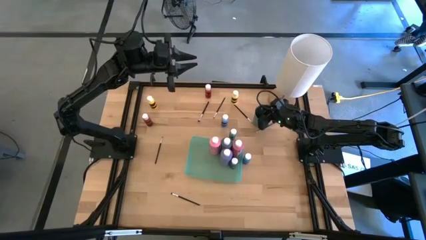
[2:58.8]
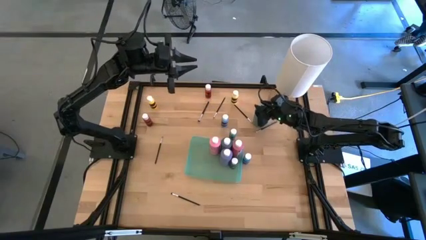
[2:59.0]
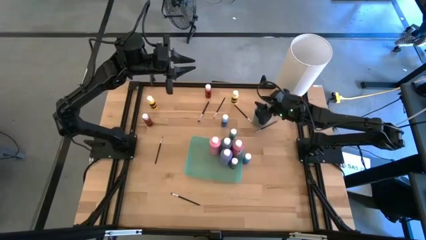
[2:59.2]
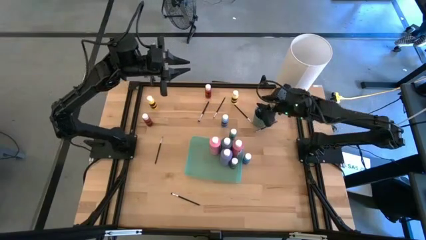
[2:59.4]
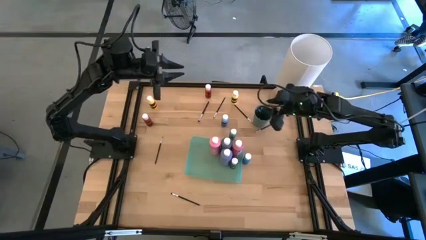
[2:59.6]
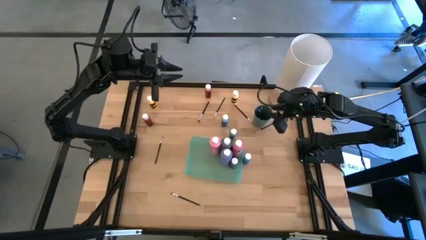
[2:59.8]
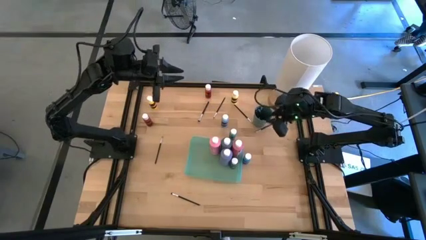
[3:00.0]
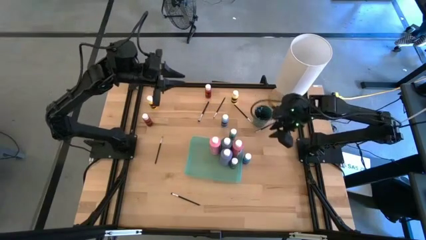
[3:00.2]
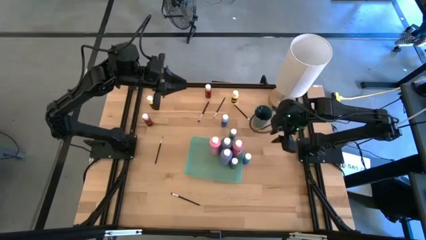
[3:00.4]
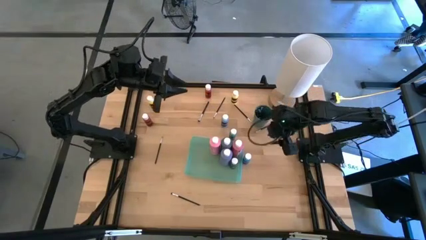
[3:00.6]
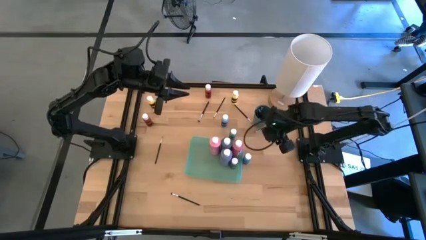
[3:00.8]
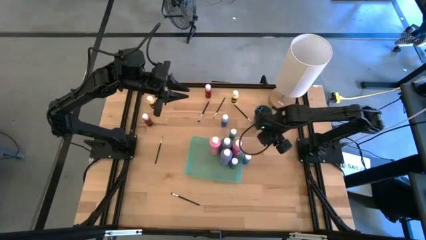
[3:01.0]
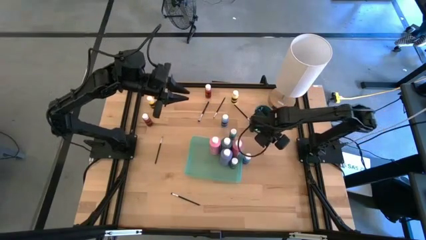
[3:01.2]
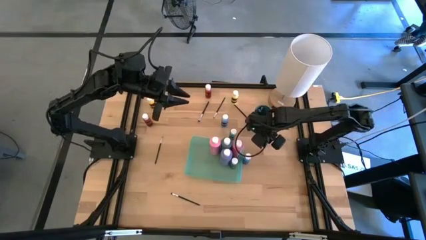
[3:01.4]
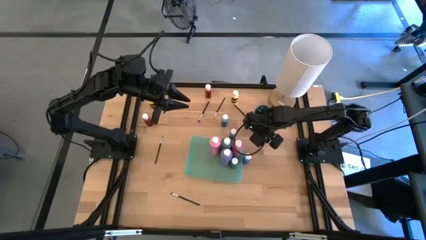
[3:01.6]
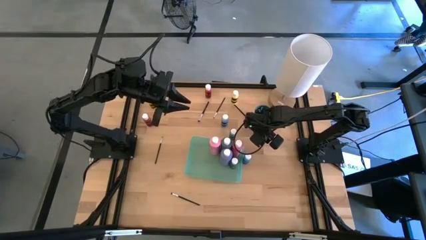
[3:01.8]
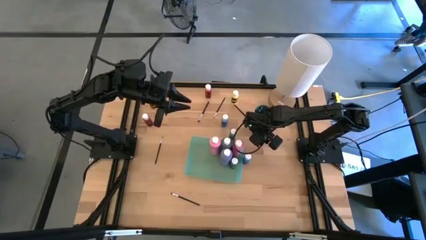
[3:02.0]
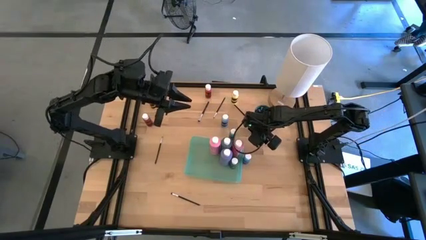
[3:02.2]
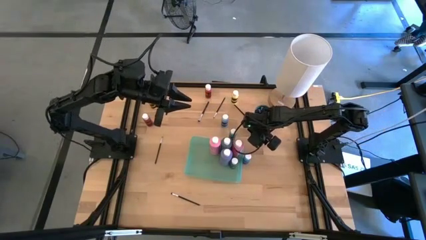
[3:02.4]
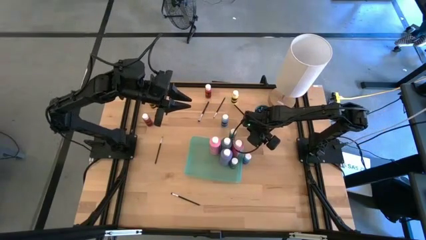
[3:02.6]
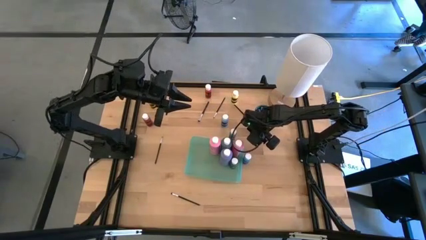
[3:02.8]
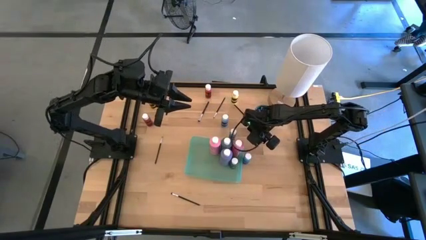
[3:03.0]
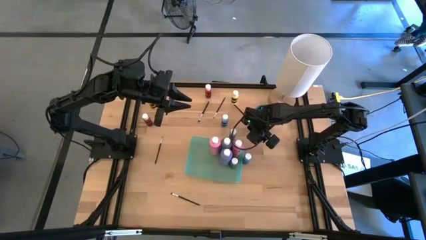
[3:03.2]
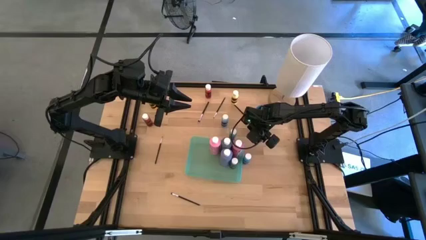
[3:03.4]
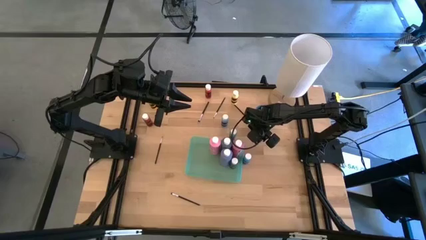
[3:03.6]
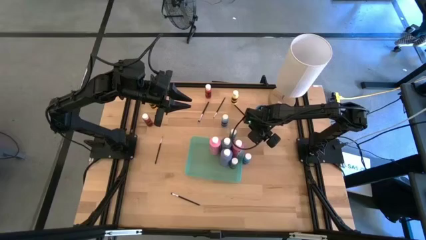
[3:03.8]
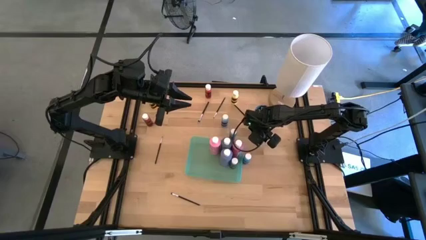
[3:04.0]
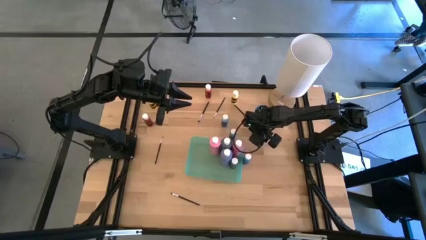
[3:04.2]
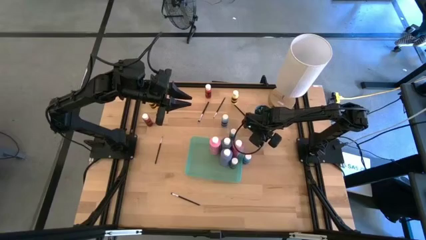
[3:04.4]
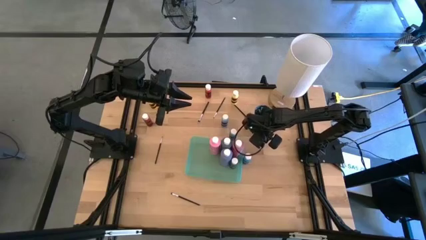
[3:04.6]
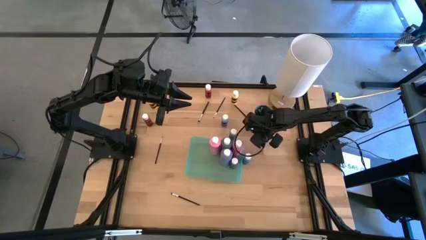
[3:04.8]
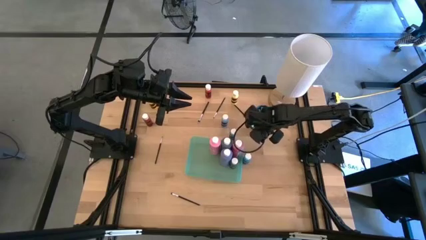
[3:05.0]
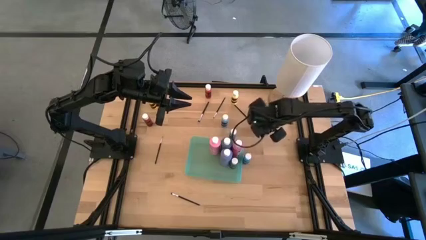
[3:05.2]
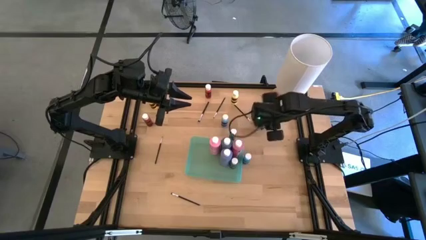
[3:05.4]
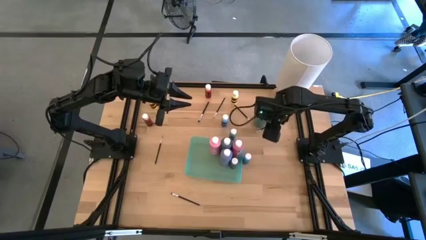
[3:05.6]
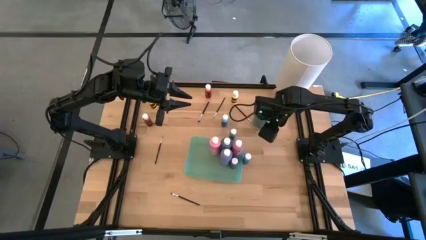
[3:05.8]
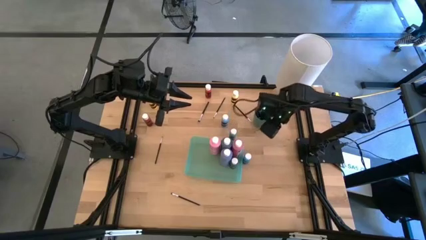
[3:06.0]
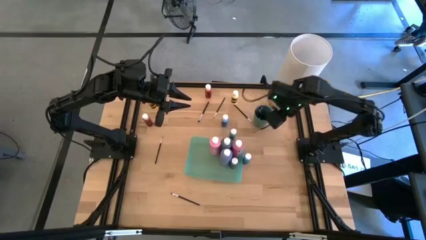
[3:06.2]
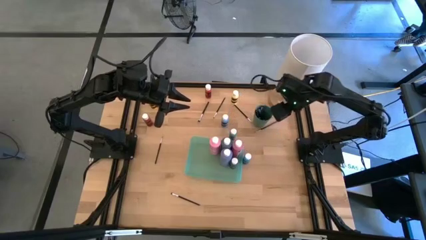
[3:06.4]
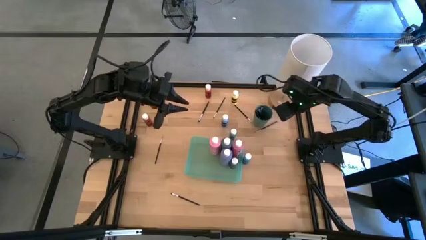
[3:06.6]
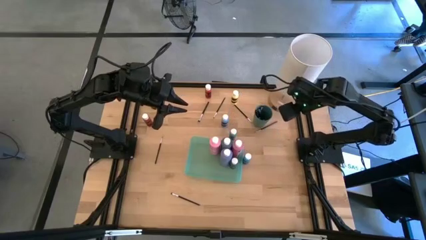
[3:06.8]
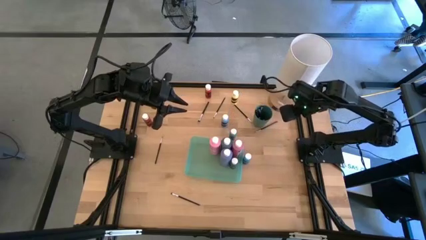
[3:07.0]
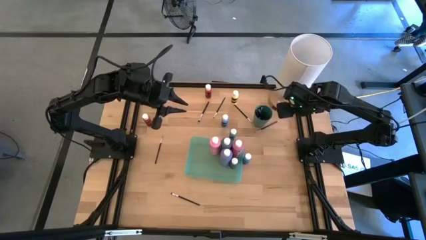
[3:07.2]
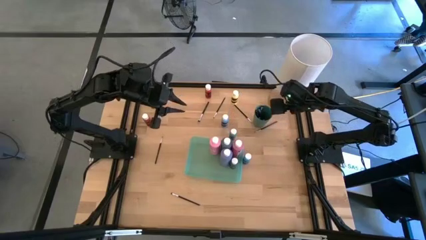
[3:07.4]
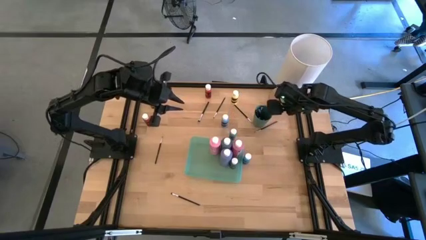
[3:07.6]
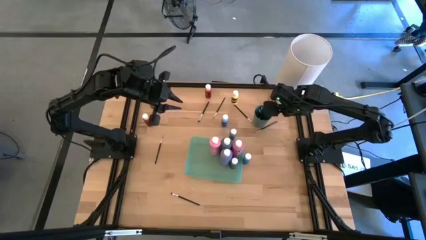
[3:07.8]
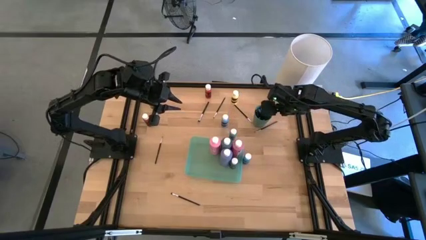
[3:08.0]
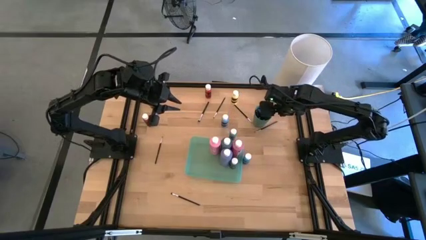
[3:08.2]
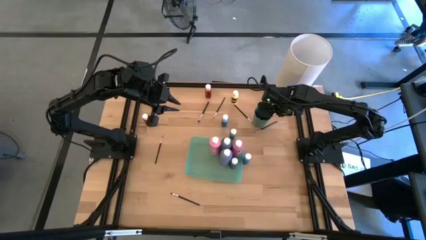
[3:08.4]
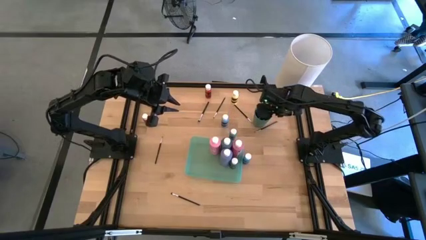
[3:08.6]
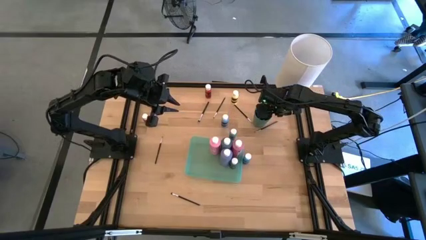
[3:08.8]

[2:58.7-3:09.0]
Task: Pick & Place Paint Supplies
Move the green cup to the middle right of the table

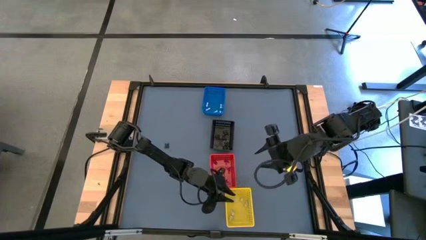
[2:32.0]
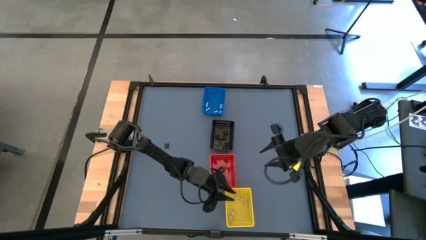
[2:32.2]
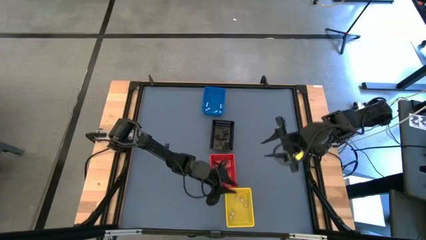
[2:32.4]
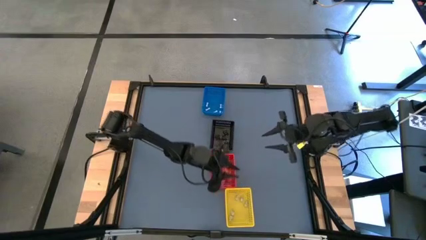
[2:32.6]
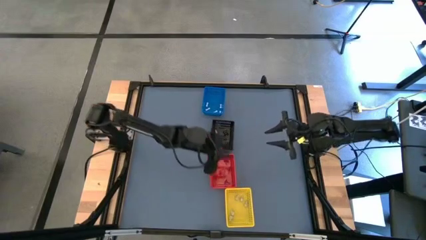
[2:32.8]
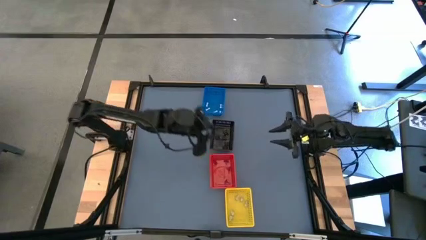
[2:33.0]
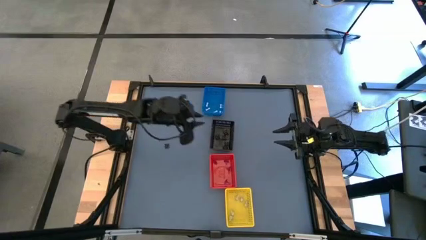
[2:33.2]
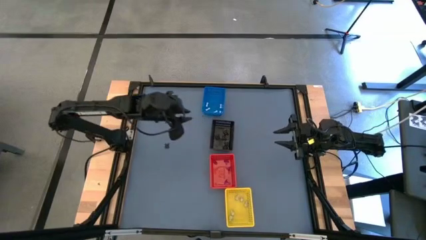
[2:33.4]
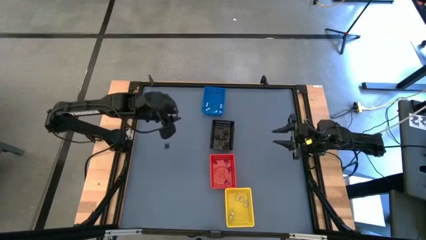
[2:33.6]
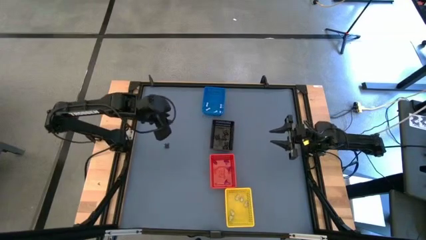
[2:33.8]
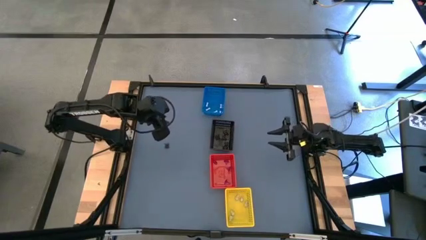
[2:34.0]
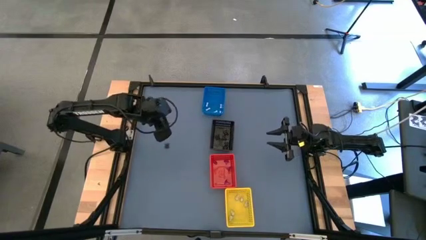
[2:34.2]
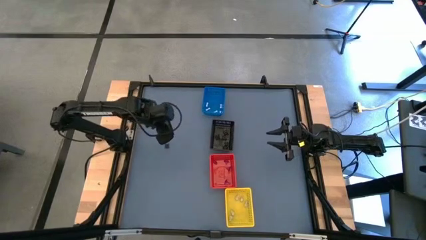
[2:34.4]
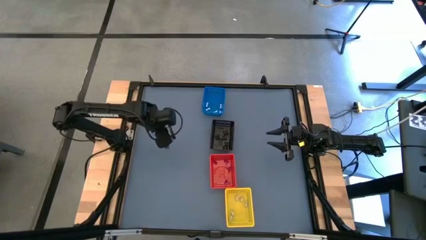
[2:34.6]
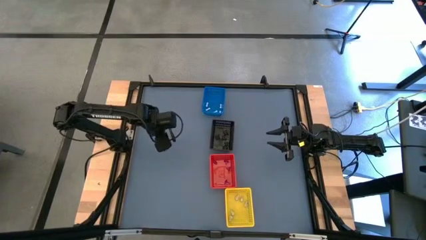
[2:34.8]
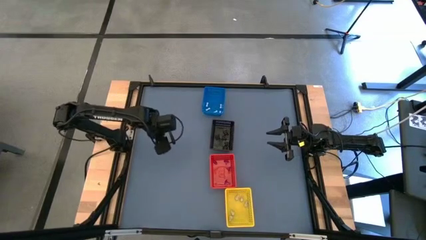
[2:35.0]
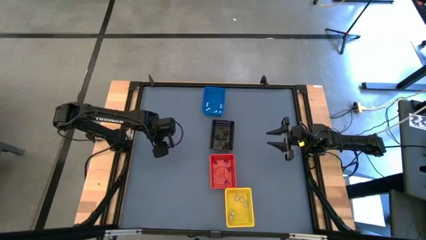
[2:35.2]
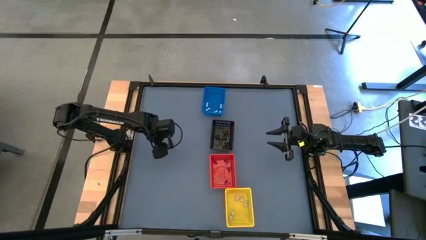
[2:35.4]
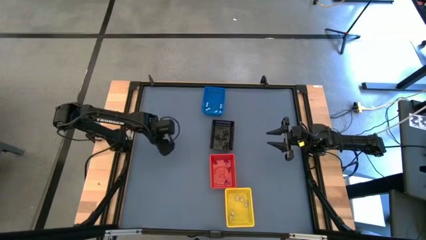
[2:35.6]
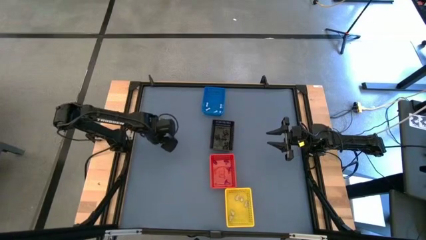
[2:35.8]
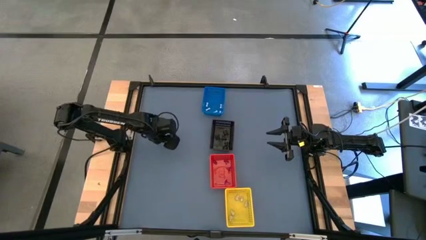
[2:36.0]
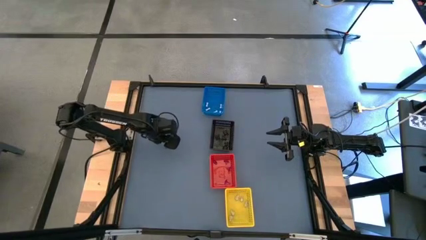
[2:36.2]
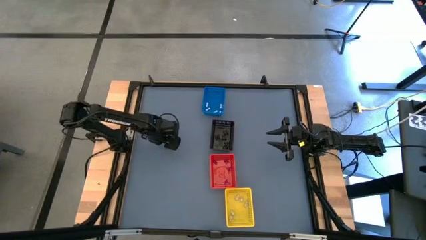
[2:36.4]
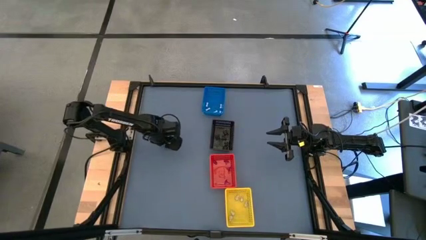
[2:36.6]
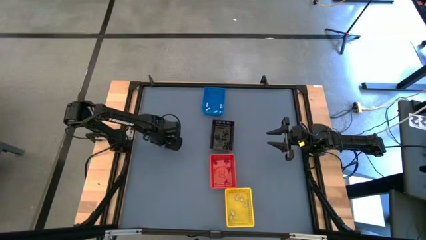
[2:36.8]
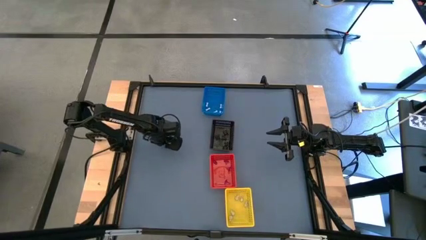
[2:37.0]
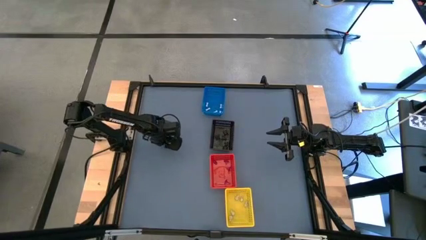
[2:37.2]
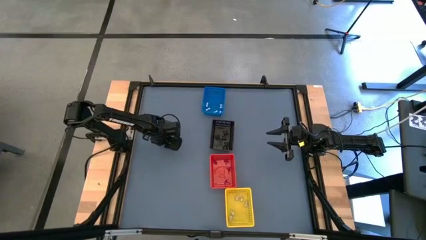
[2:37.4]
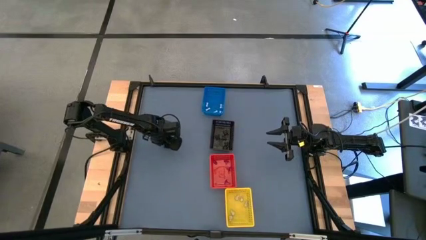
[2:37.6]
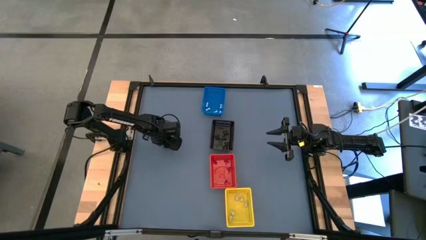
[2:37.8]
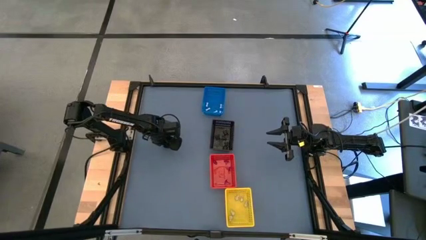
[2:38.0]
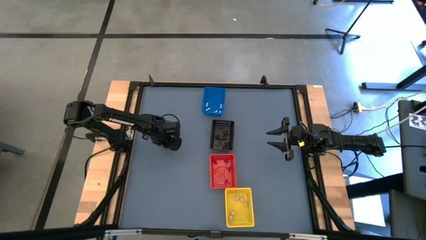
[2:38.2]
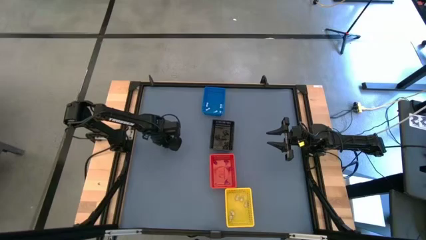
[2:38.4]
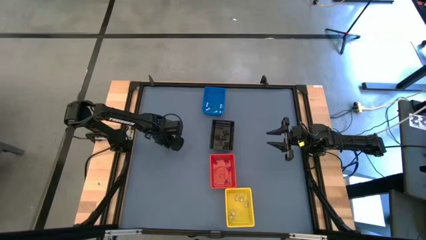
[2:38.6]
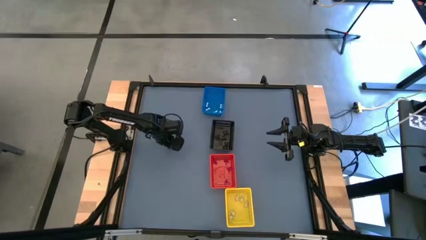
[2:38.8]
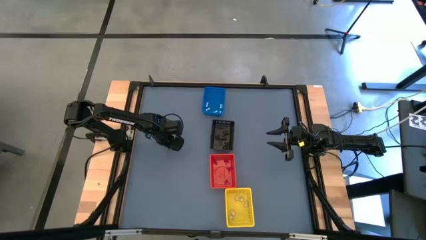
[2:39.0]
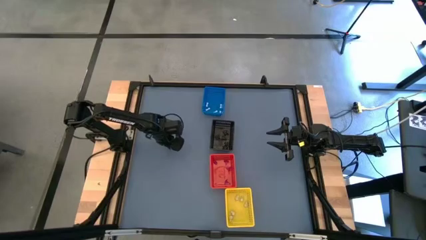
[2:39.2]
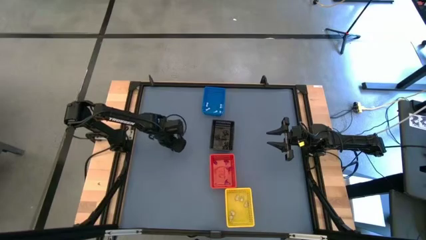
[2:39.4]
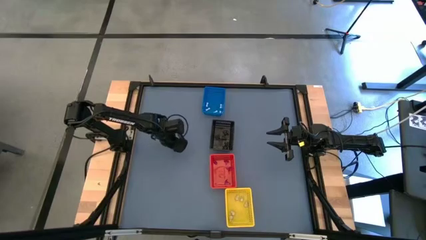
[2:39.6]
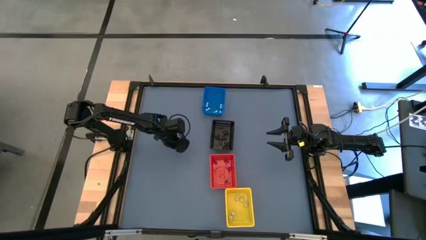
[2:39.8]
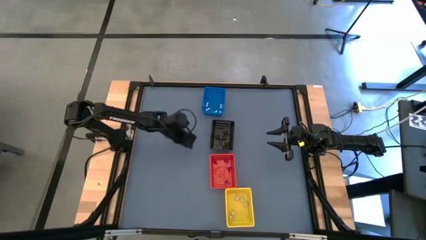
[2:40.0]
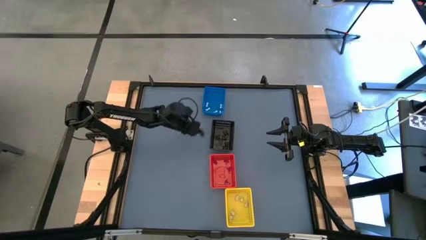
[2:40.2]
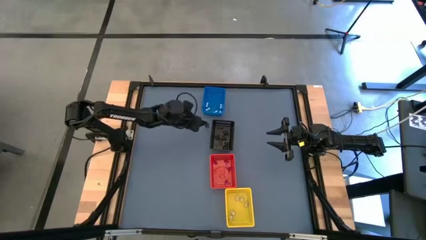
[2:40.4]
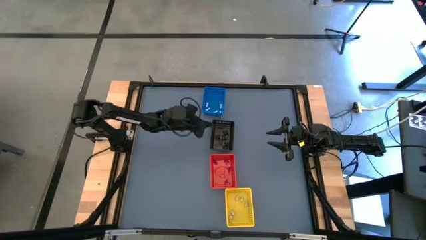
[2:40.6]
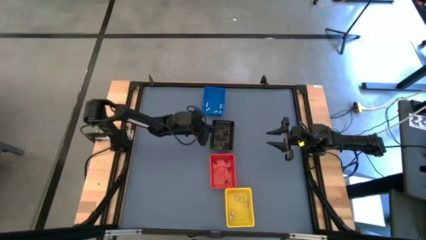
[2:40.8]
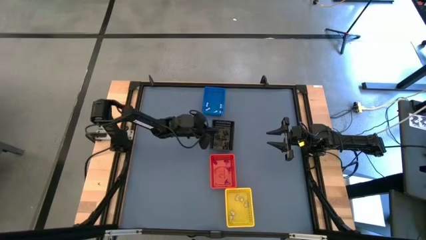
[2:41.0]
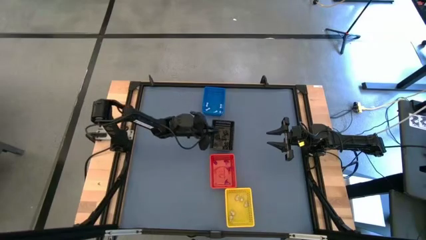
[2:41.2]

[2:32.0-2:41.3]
Task: Sort Halloween decoration
Put the black spider toy into the black bin
